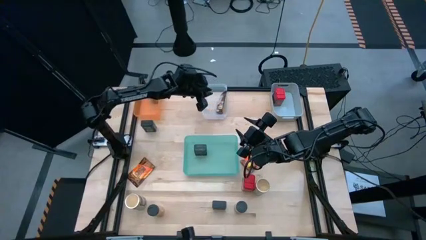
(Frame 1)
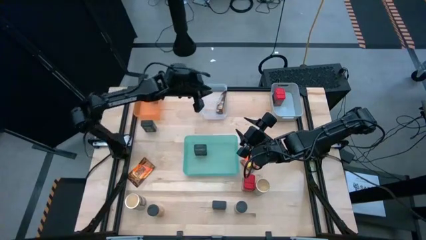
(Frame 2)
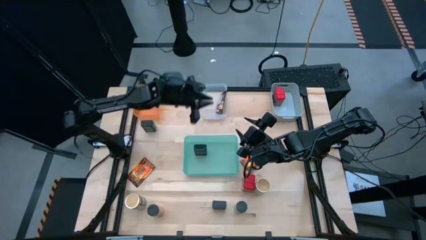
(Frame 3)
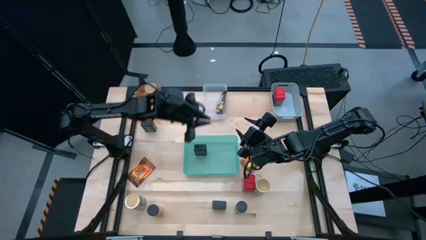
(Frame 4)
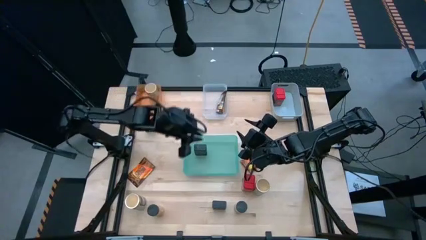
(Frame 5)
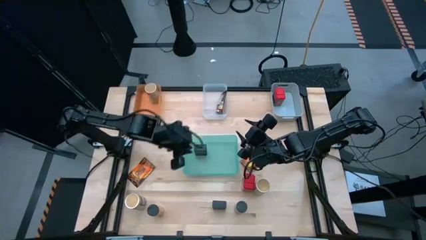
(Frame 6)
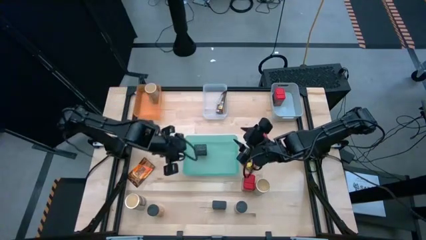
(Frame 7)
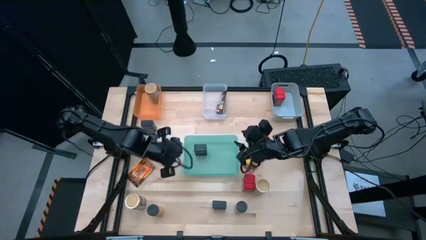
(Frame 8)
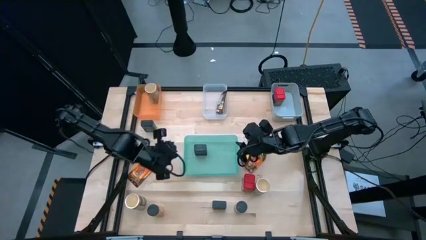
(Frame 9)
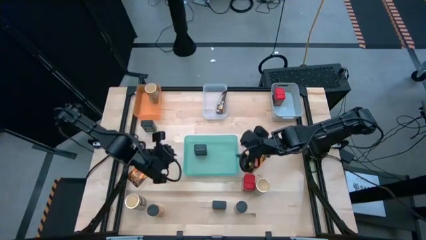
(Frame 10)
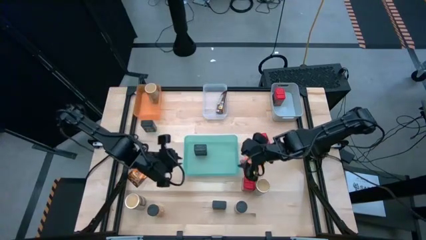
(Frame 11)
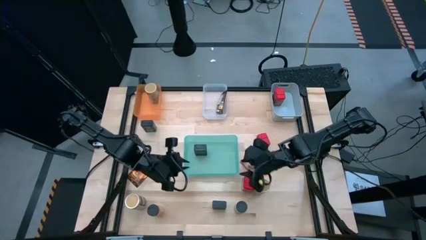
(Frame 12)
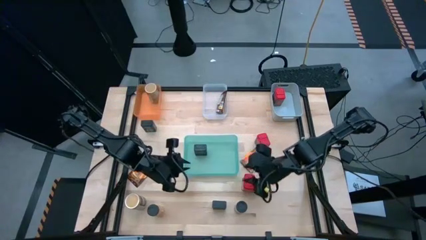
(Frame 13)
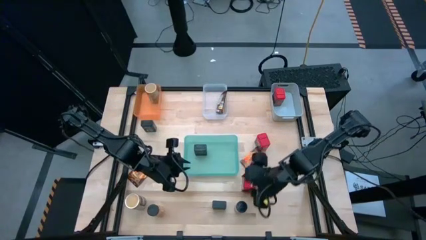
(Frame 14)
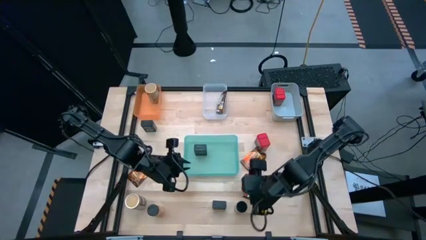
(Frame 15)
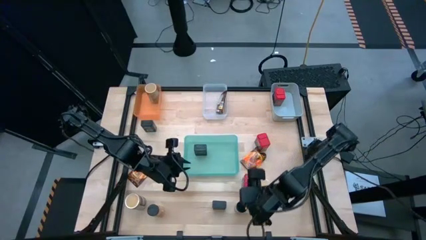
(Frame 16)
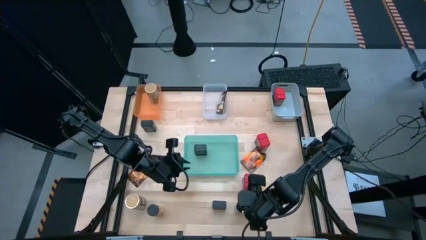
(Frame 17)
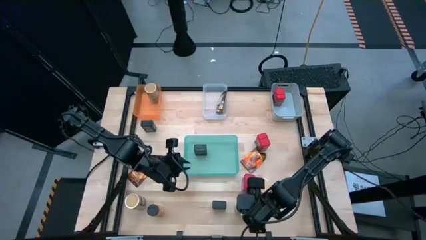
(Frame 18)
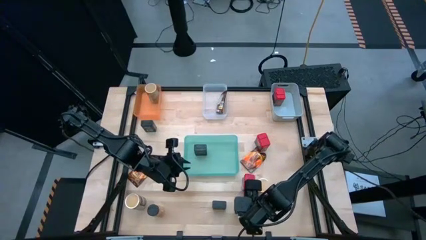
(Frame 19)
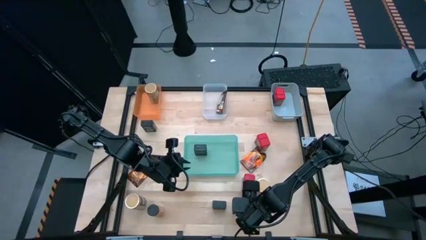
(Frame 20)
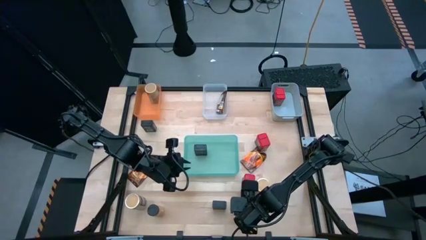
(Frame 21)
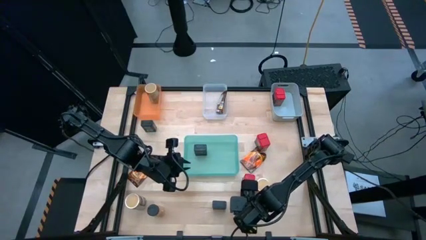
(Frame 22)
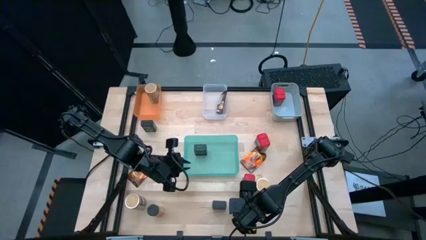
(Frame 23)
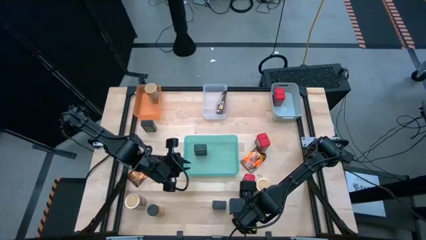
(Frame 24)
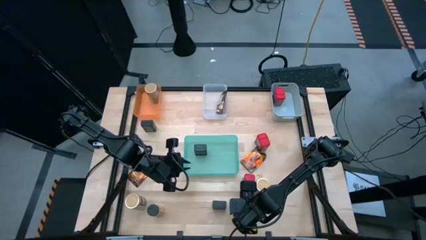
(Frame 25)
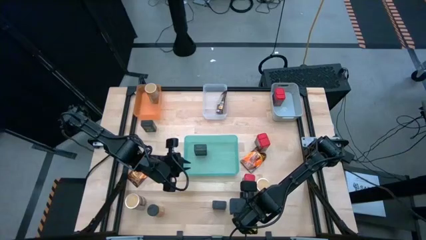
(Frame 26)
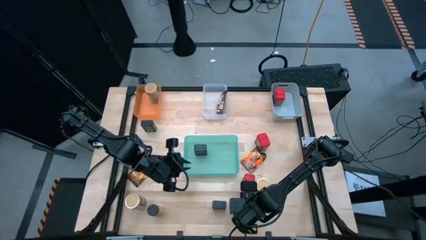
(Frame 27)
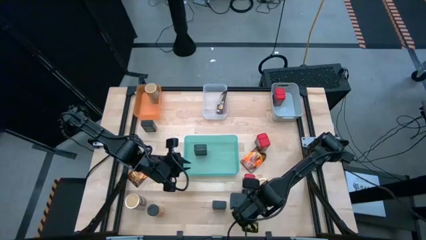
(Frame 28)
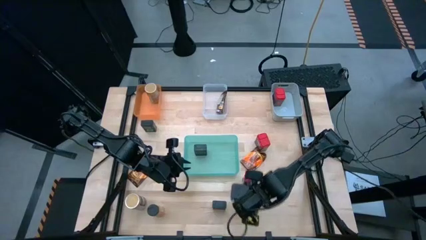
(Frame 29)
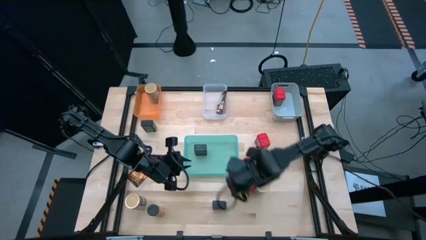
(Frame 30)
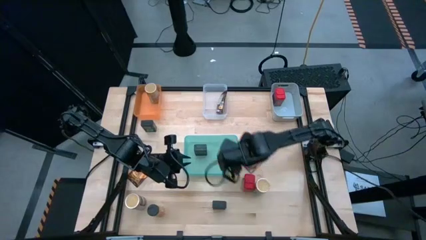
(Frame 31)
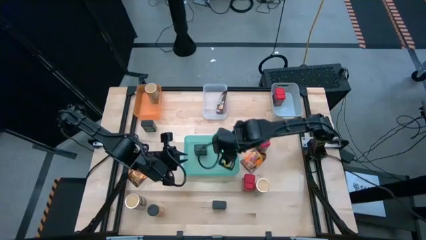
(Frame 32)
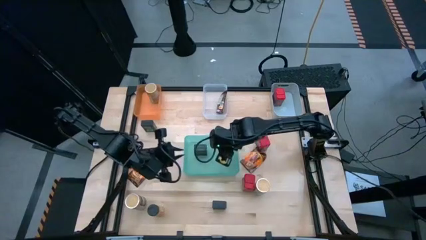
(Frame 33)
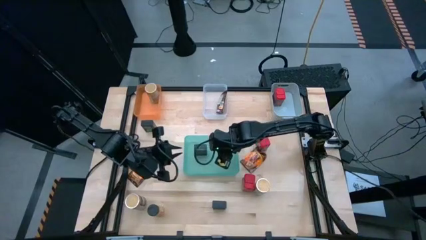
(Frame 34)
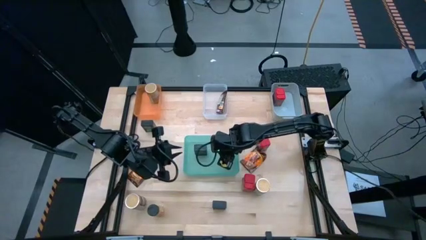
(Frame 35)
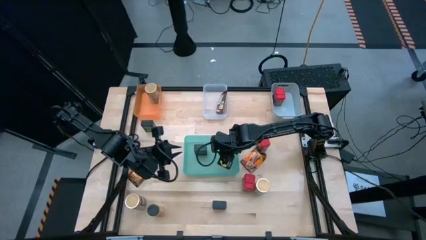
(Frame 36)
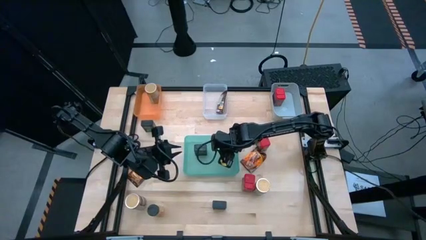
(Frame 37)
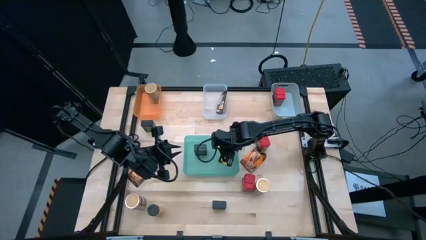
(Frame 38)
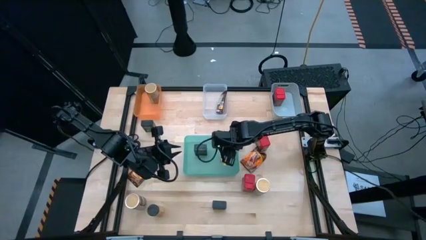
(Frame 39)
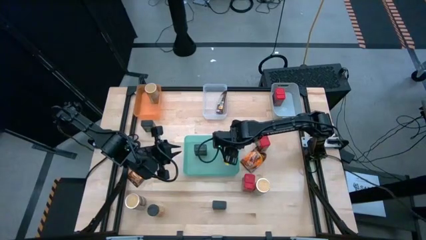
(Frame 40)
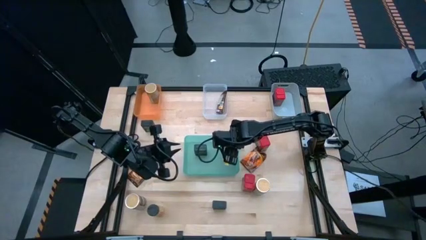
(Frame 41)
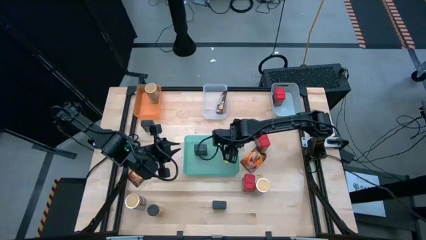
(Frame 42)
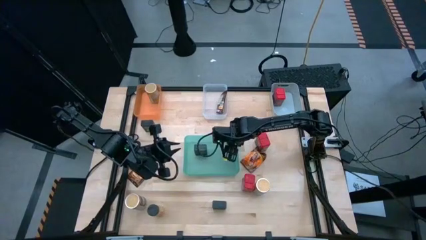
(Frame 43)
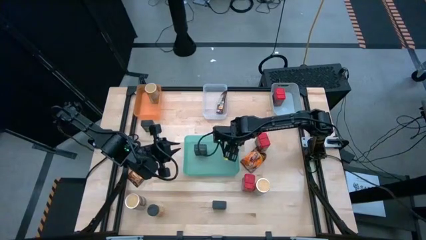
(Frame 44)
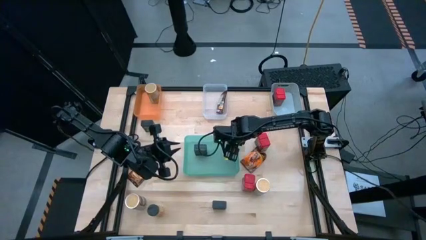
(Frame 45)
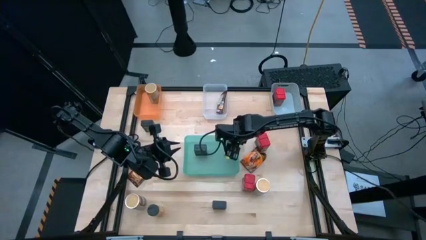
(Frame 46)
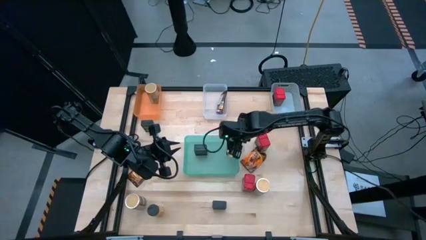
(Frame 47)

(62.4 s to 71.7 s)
Task: Sort spices by type
Put the right black spice bottle into the green bin

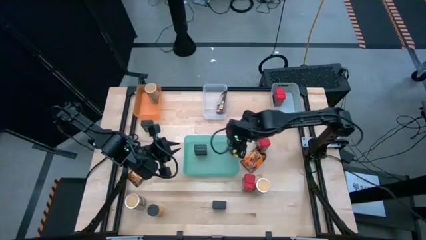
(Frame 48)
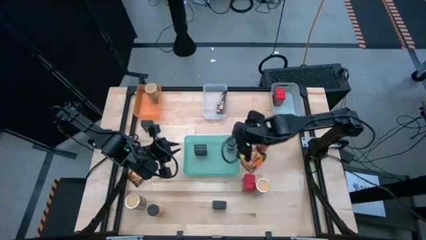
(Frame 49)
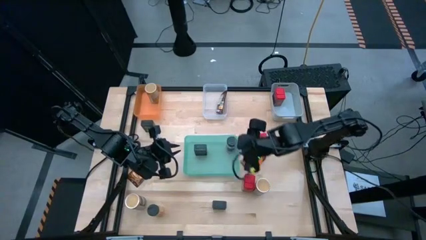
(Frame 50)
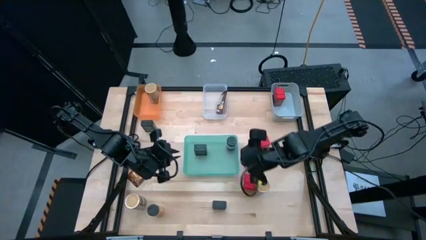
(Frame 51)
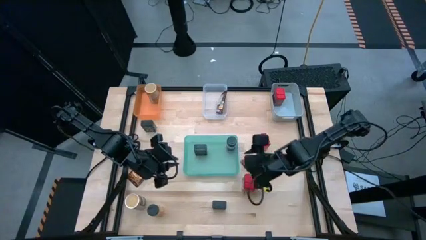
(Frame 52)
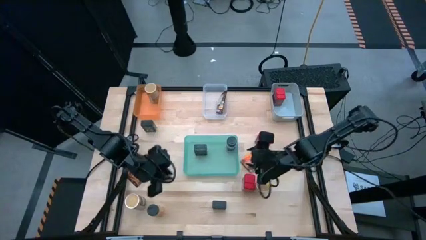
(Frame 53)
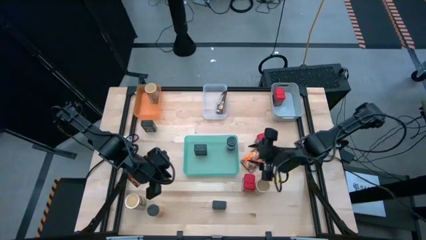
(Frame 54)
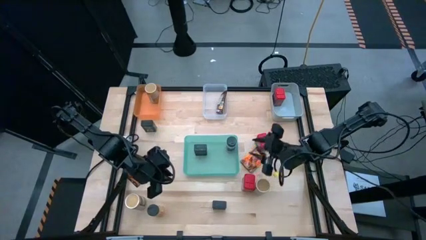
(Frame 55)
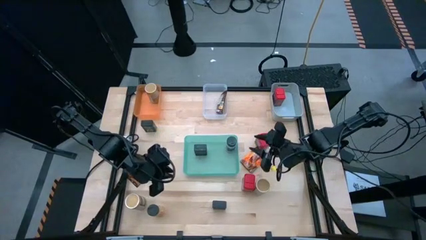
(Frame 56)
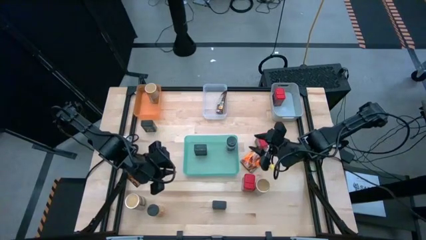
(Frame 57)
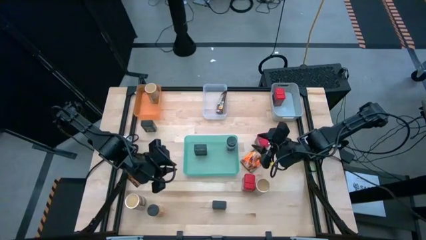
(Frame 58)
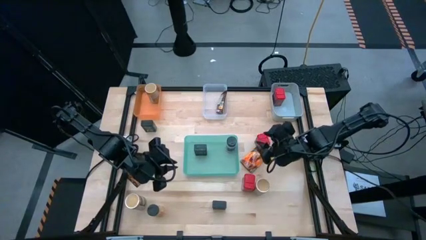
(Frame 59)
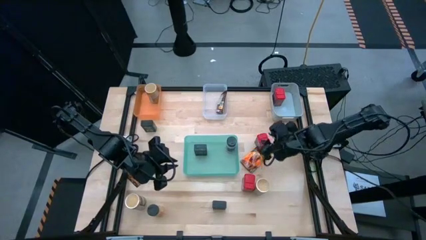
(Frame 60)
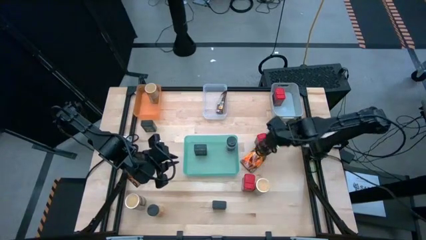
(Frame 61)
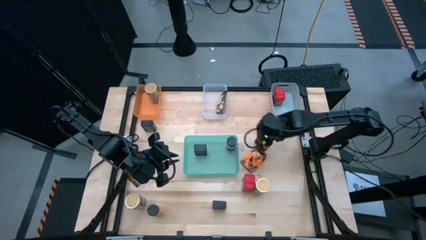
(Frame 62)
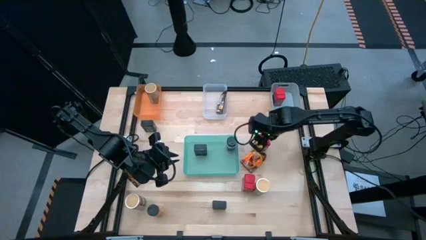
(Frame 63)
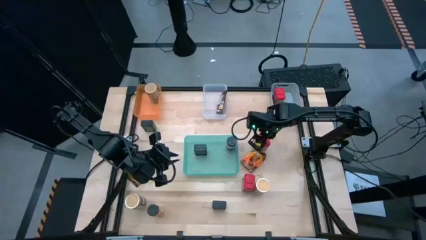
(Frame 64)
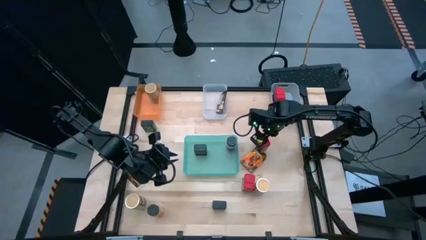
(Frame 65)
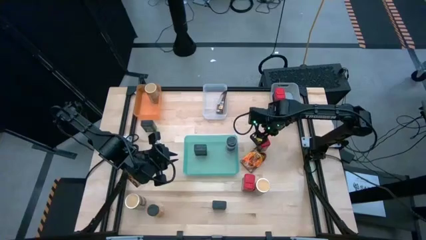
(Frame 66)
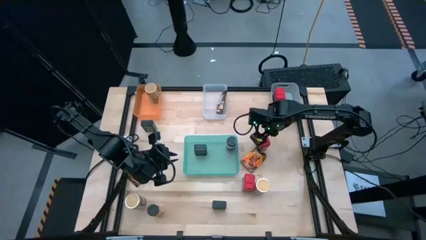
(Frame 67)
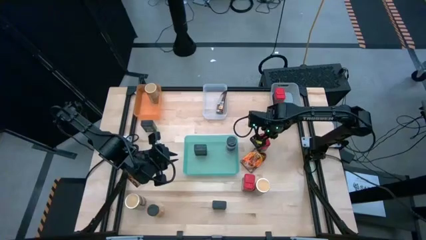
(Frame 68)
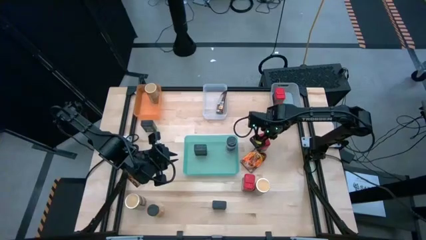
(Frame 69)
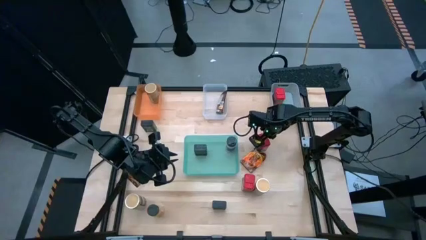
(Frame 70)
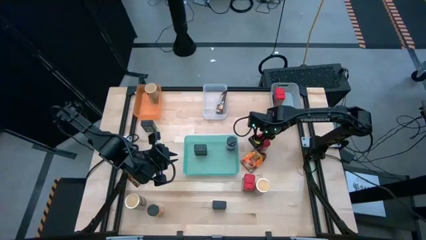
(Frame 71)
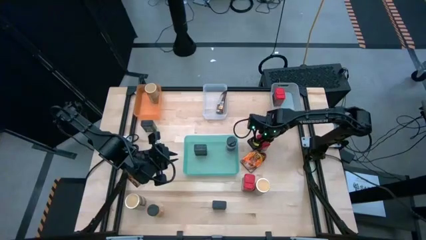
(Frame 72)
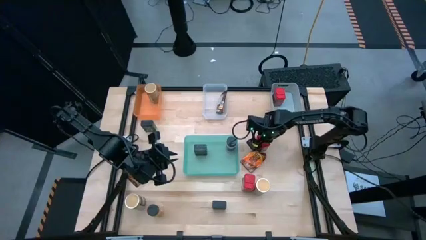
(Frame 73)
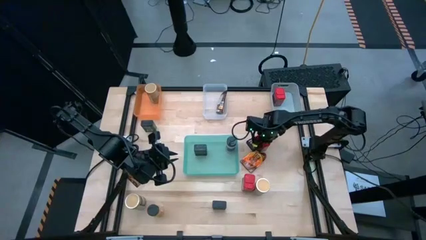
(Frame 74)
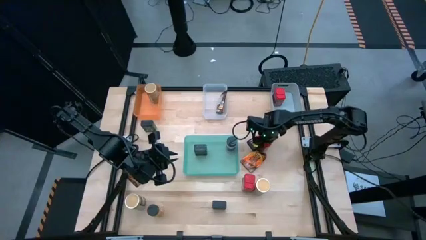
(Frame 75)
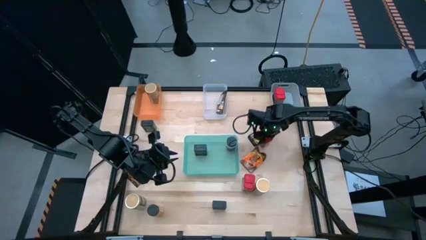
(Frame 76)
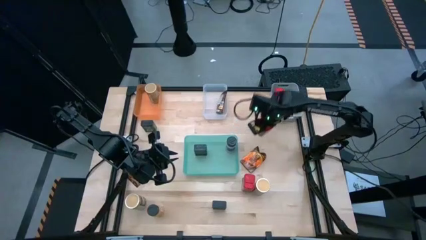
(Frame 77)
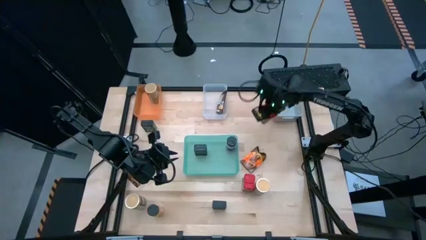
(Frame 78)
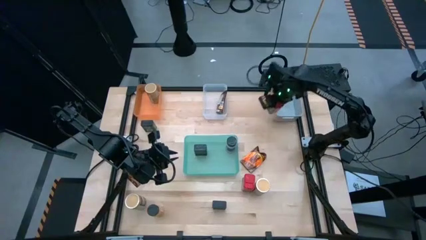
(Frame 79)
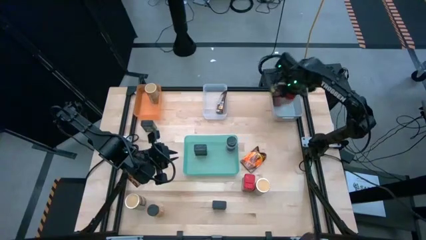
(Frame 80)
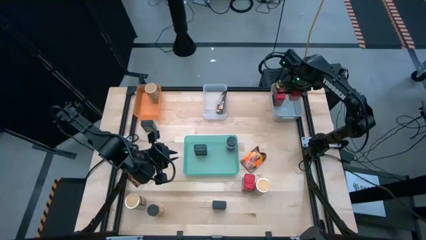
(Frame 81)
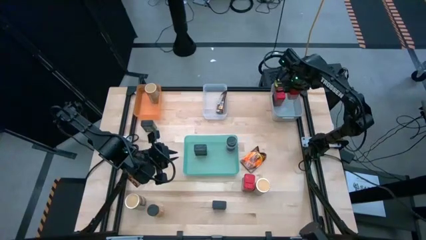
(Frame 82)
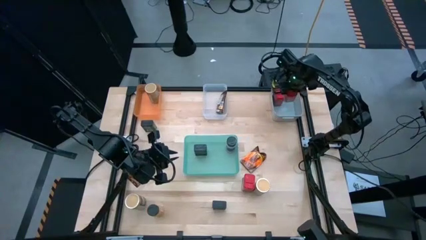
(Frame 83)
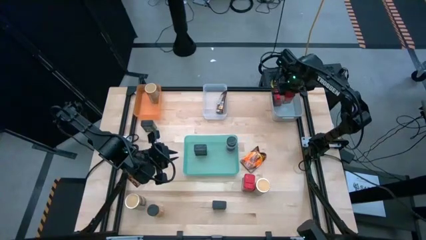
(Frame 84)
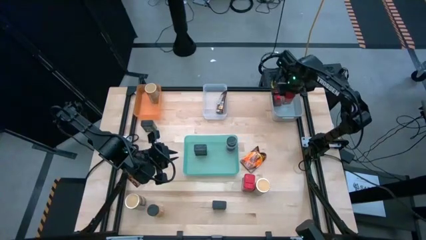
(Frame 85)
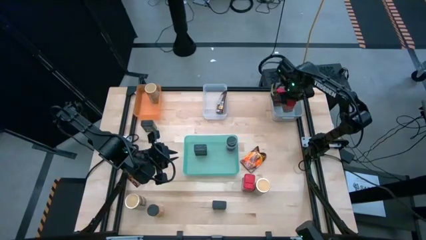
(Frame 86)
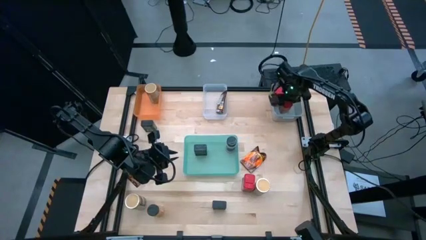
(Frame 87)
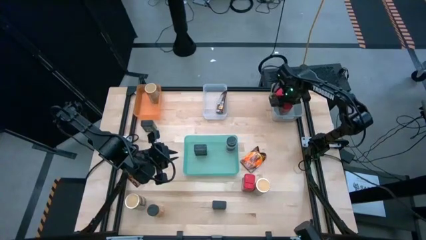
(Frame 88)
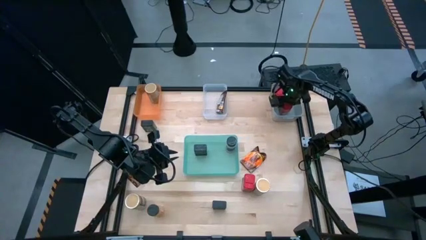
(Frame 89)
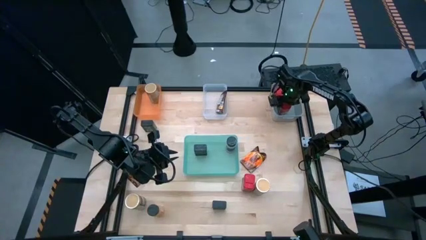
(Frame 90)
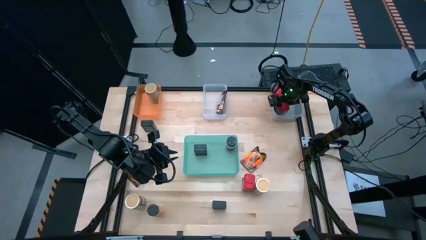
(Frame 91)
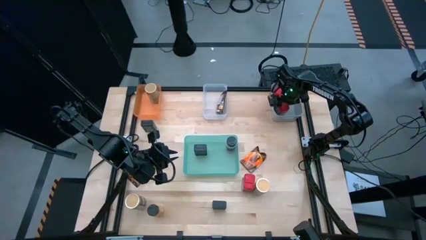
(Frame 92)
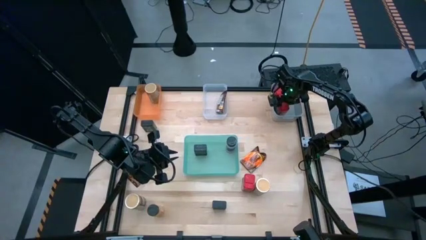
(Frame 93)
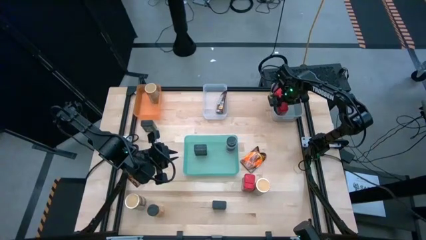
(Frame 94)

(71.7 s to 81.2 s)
Put the top red spice can into the gray bin
